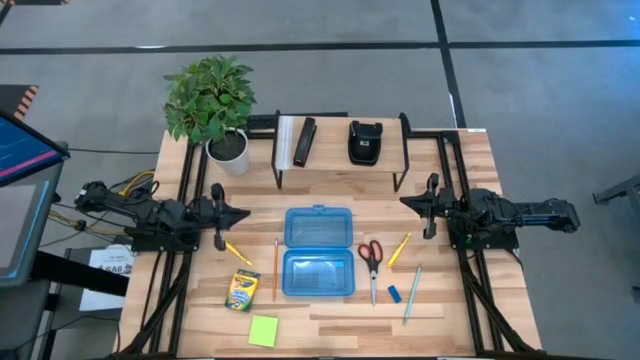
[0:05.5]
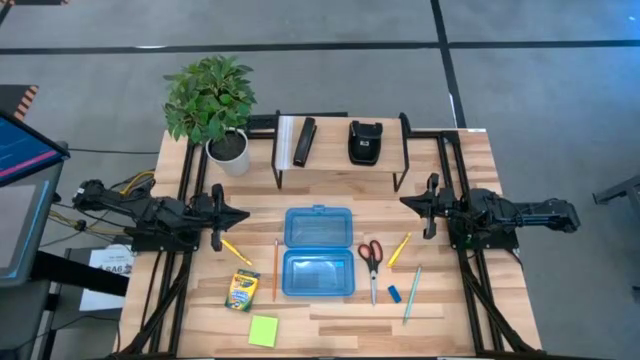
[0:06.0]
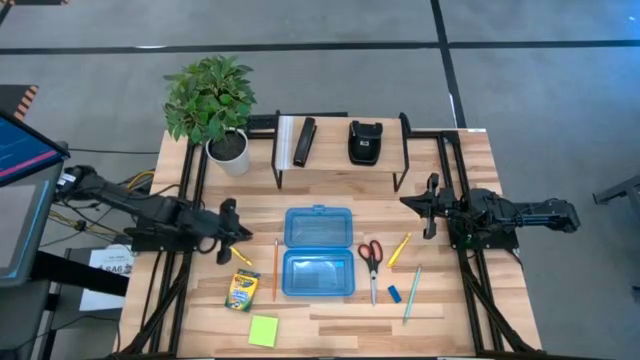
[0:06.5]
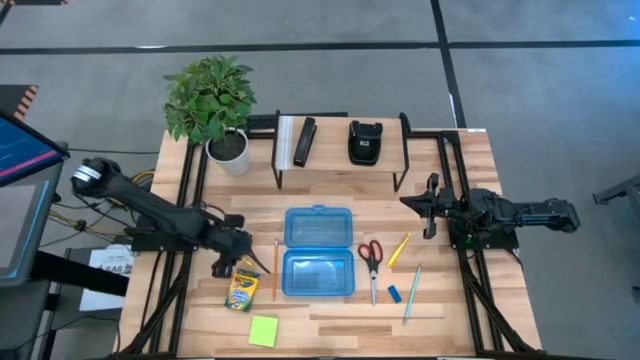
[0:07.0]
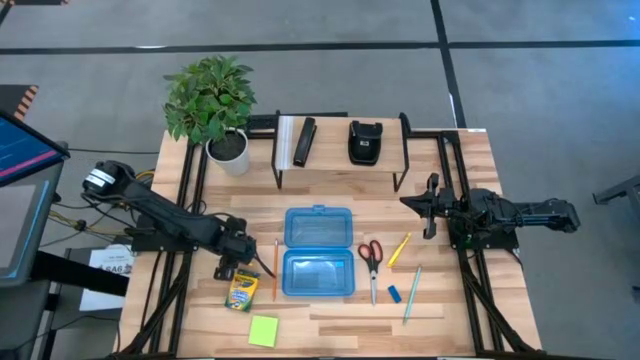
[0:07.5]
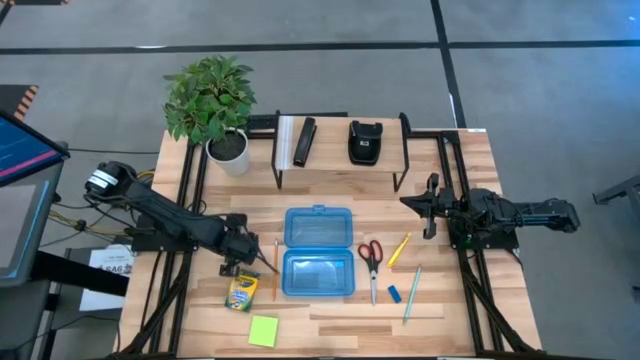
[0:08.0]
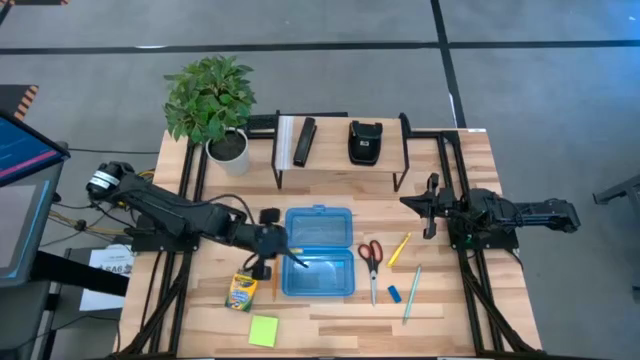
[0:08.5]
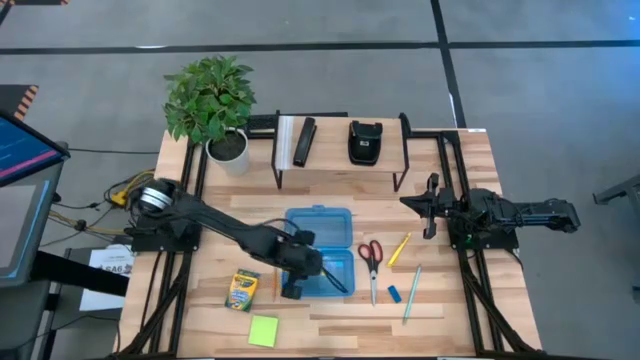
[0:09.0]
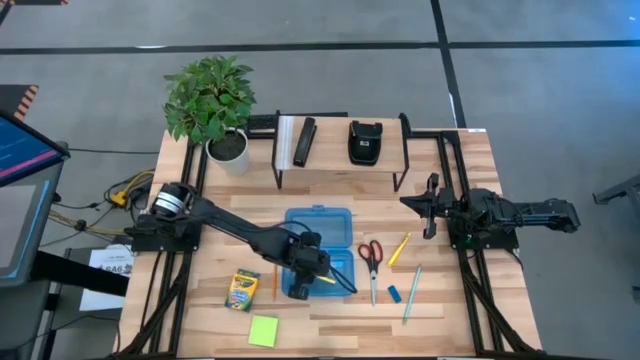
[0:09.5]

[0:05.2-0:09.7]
Task: Pack school essentials
Put the left yellow pen into the blue pencil box

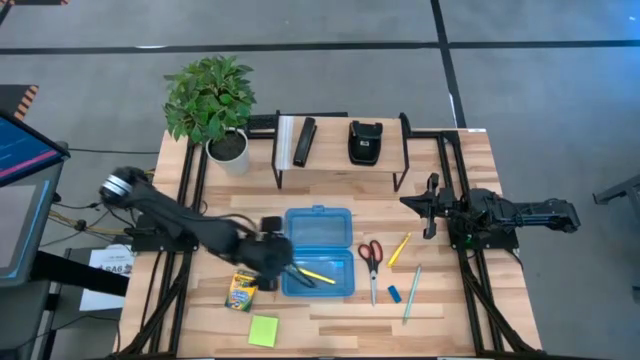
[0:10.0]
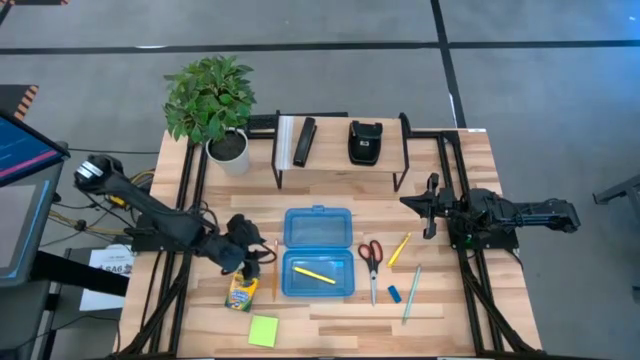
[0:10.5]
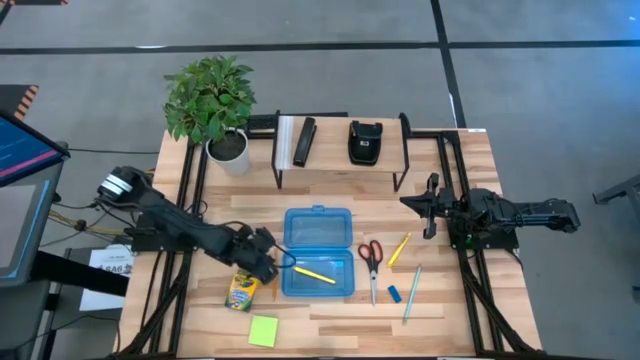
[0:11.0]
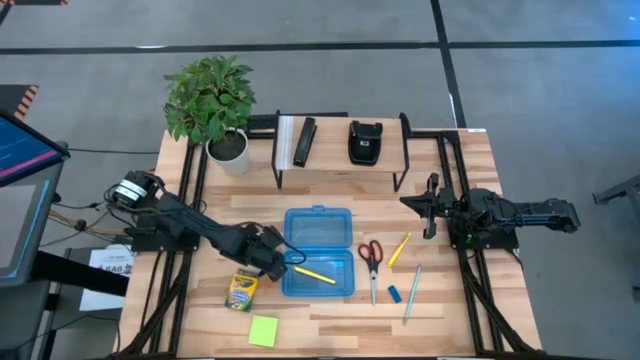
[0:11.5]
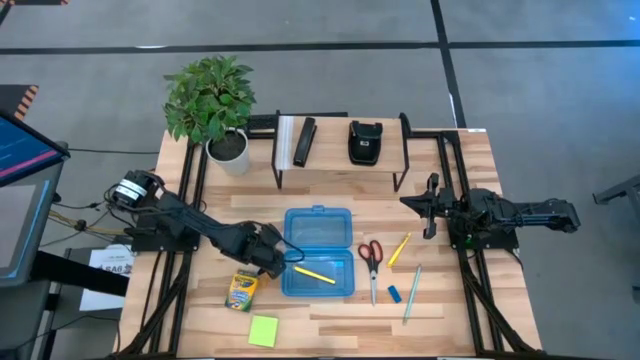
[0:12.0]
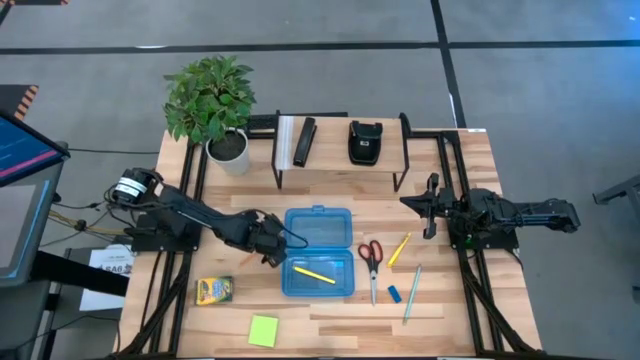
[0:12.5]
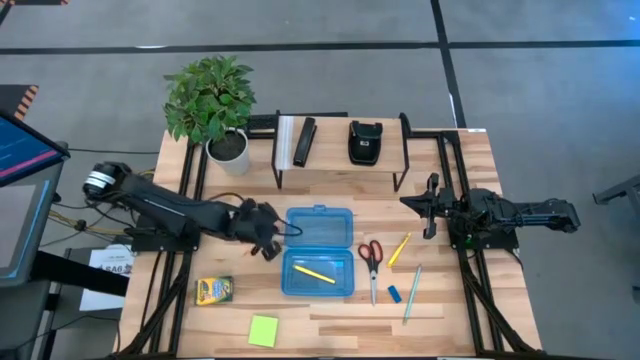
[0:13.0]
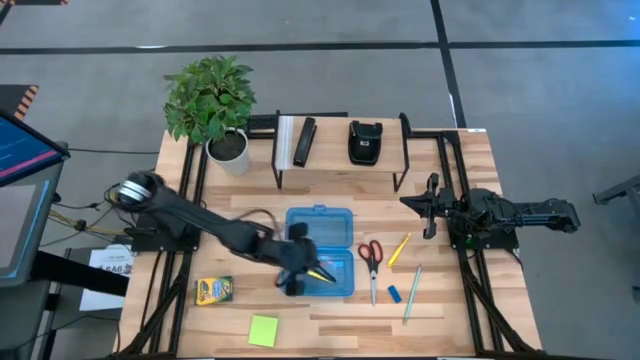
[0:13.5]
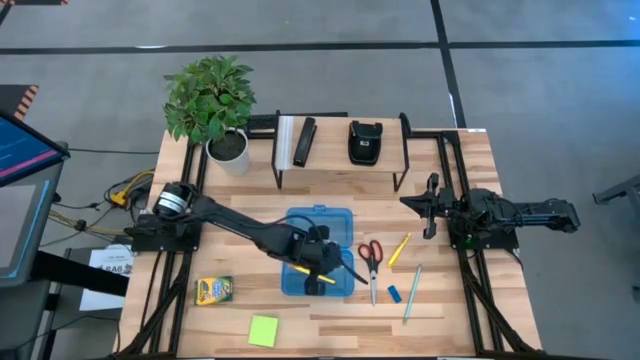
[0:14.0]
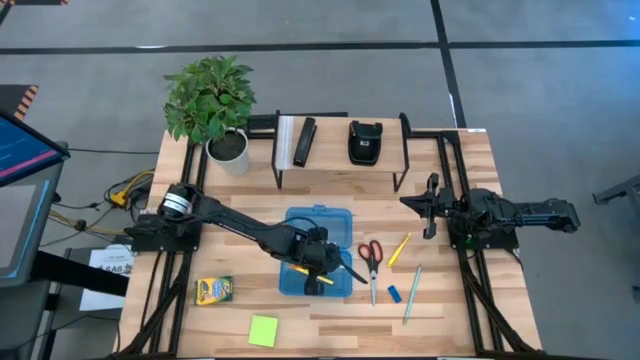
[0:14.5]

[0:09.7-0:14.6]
Put the orange pencil into the blue pencil box

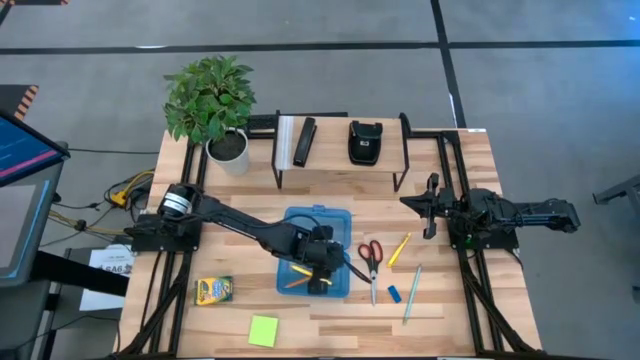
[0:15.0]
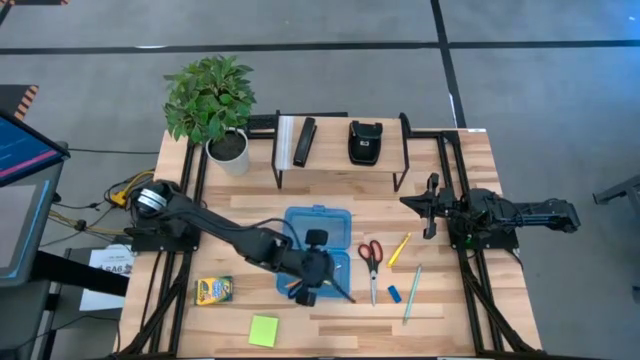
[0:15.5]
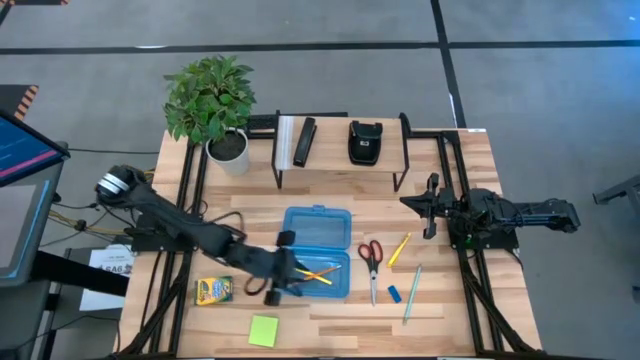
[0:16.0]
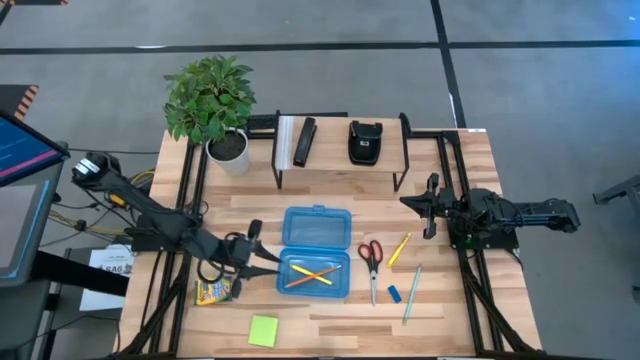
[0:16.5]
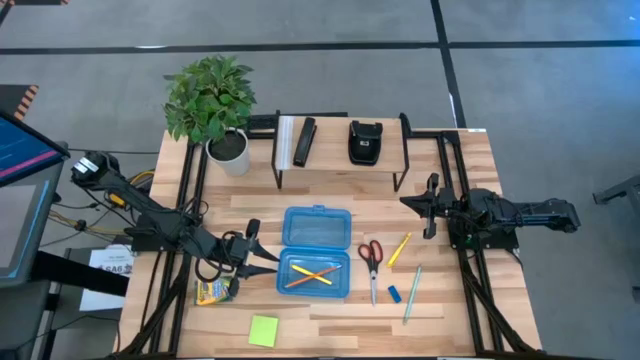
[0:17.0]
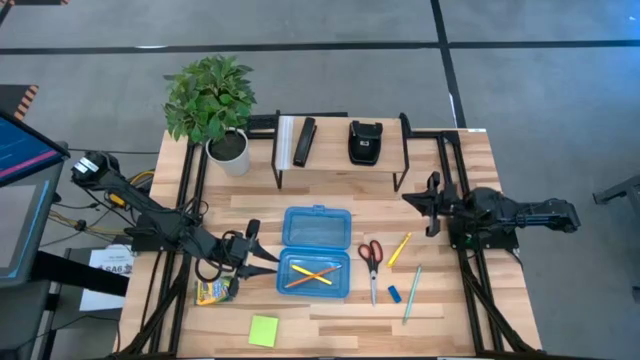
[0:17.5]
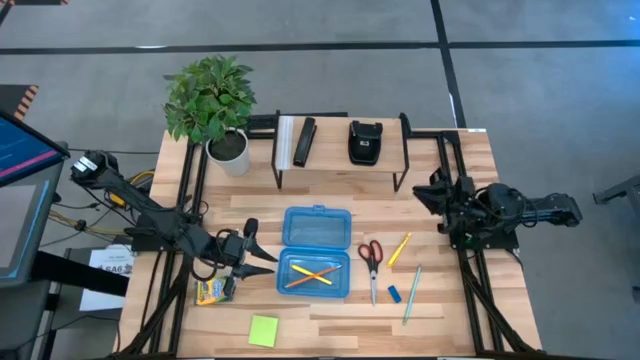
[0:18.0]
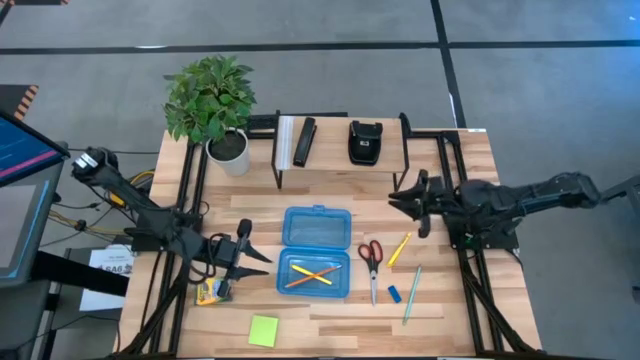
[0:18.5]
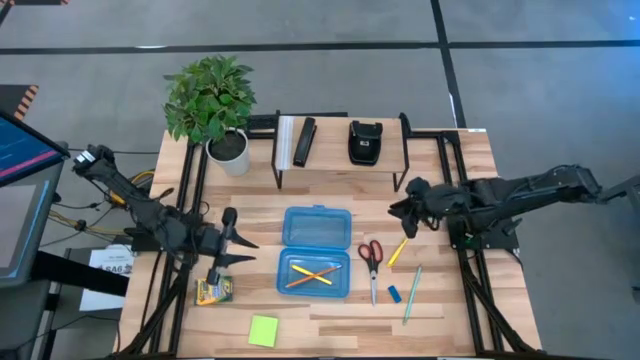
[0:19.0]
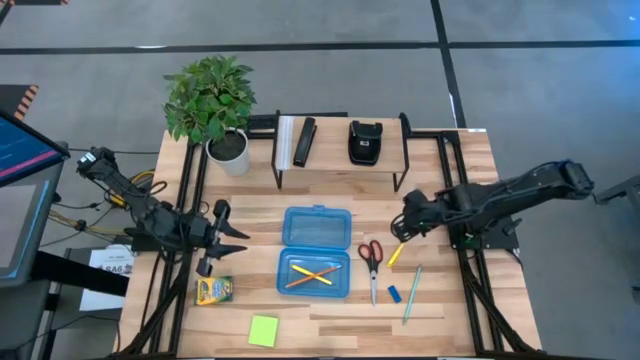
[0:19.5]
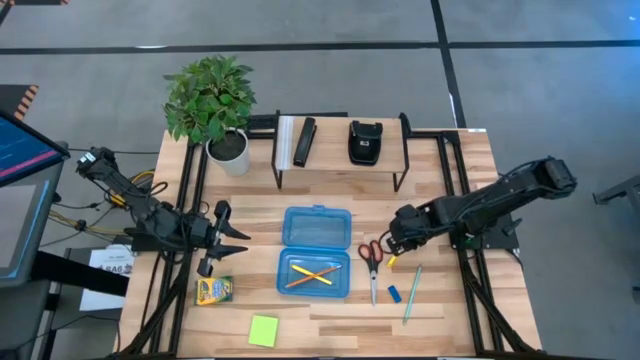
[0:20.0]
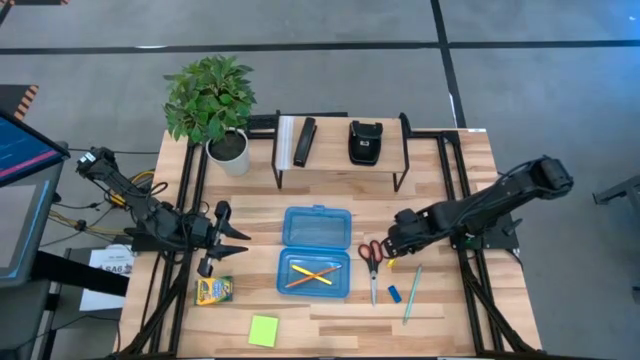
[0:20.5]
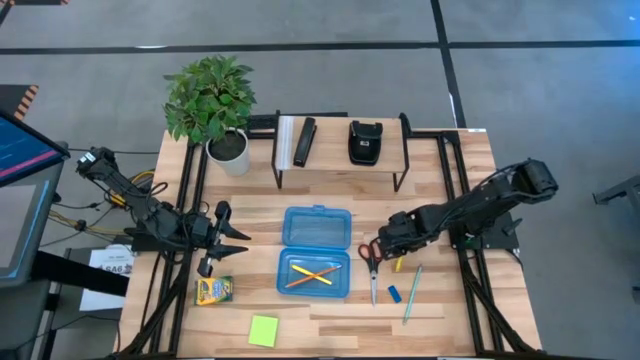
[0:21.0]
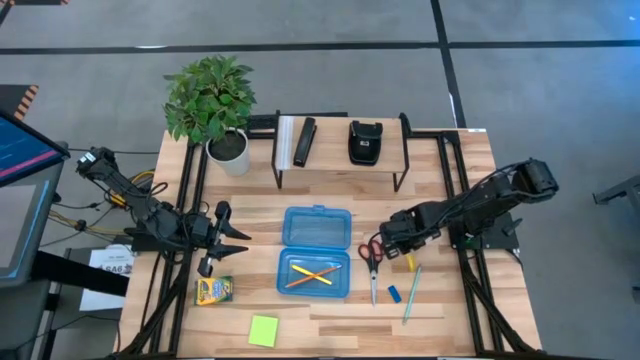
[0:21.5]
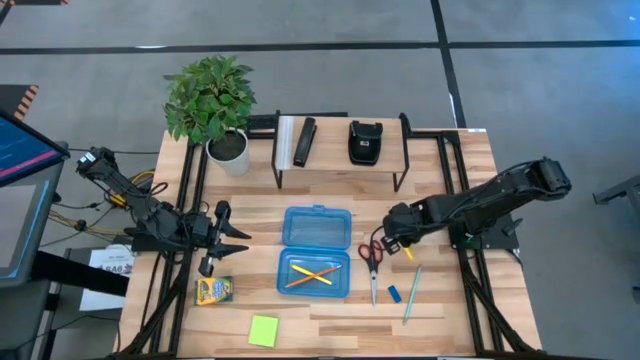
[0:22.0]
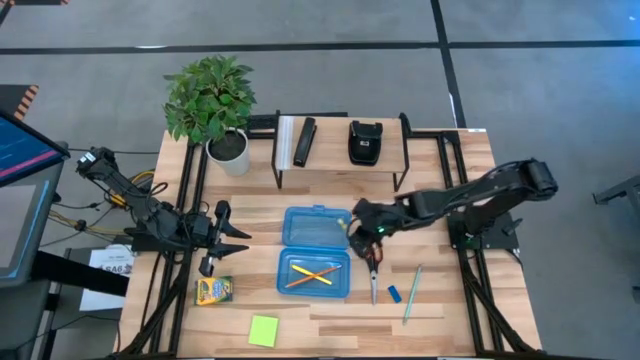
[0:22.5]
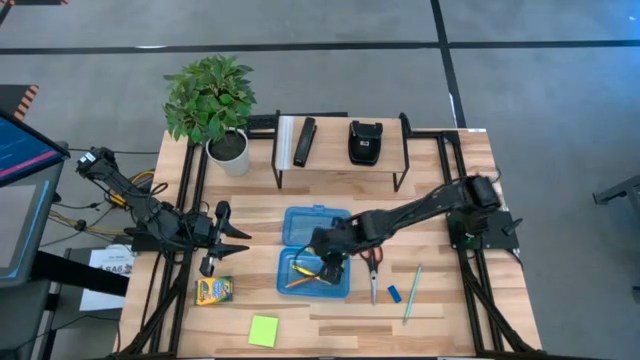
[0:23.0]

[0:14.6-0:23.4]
Put the yellow pencil into the blue pencil box

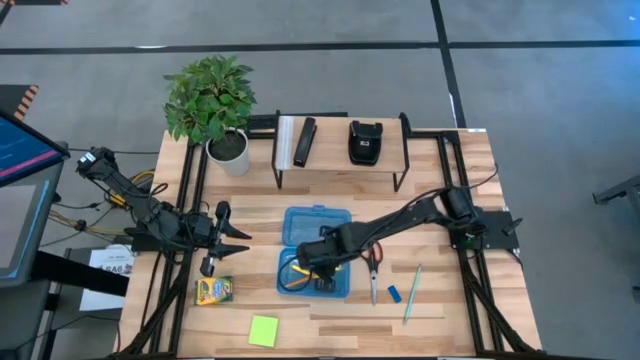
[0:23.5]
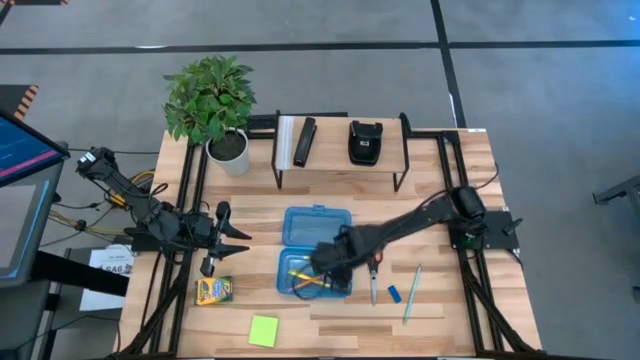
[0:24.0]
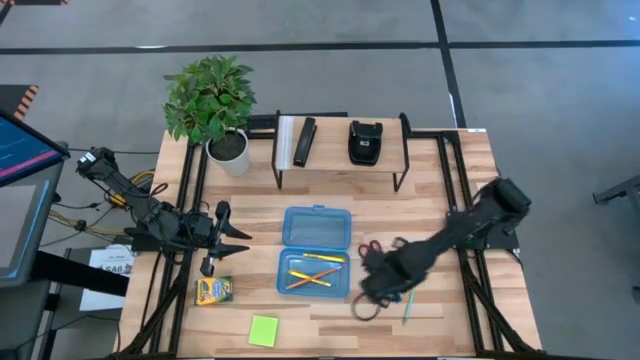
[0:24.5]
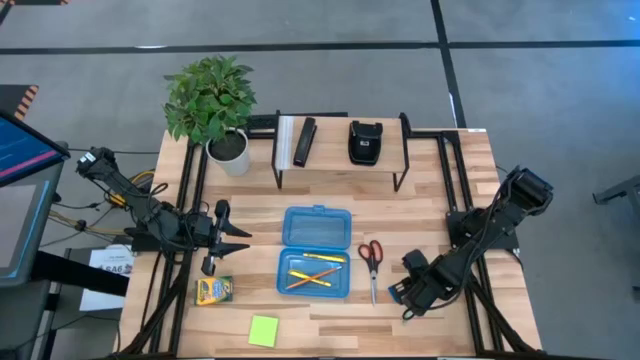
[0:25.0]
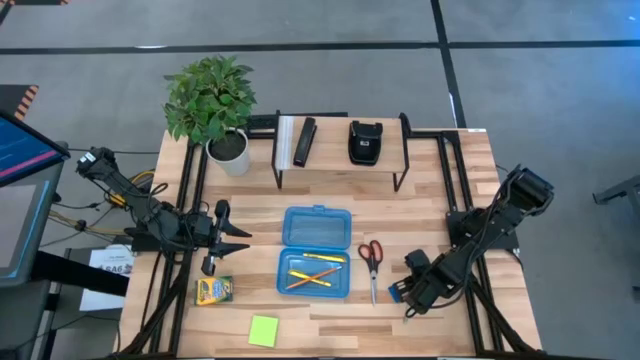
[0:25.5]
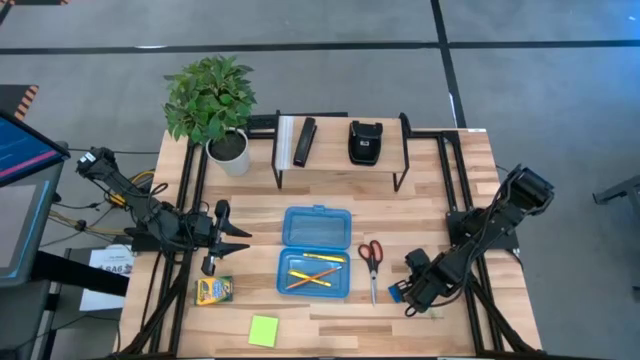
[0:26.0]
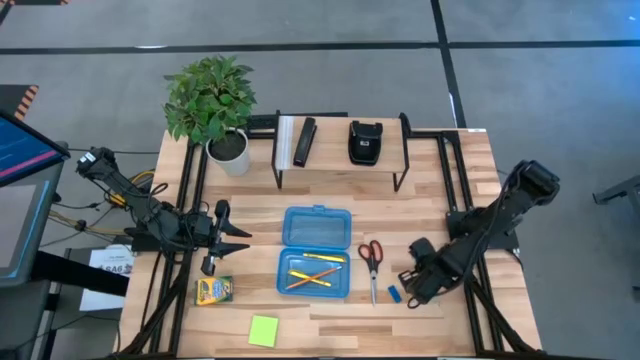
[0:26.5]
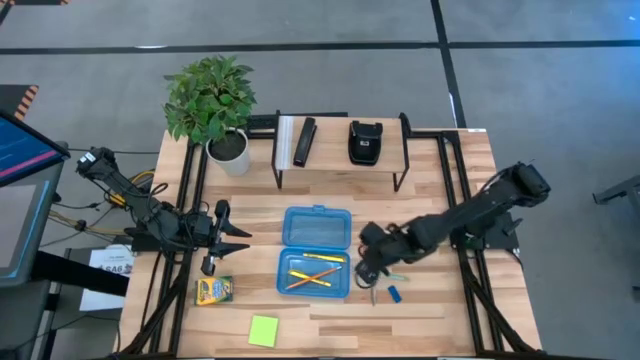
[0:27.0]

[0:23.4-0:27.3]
Put the light blue pencil into the blue pencil box
